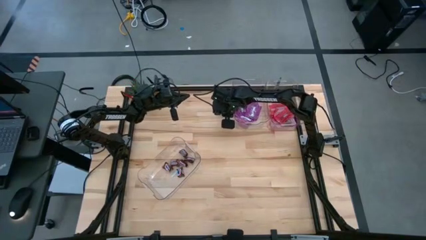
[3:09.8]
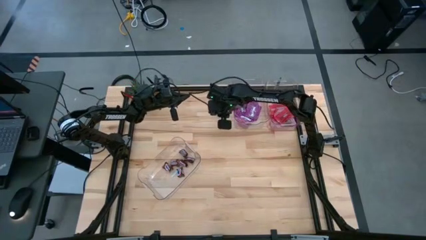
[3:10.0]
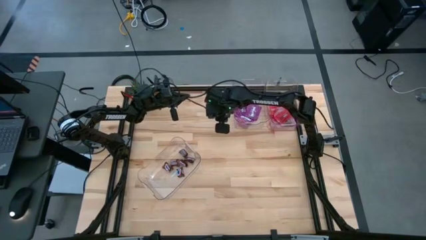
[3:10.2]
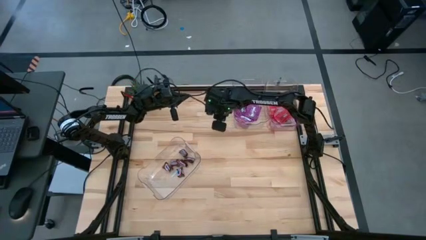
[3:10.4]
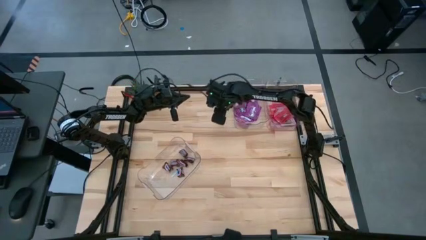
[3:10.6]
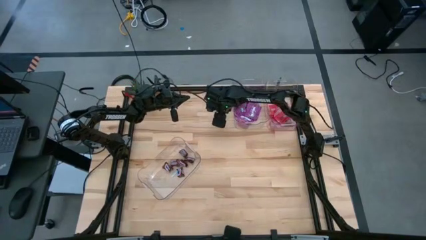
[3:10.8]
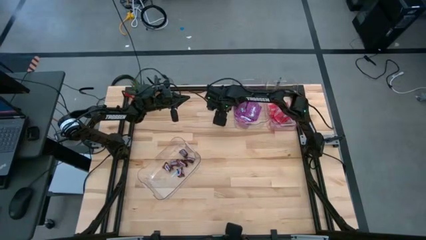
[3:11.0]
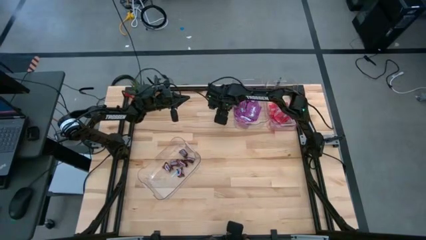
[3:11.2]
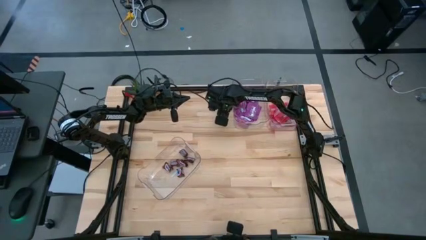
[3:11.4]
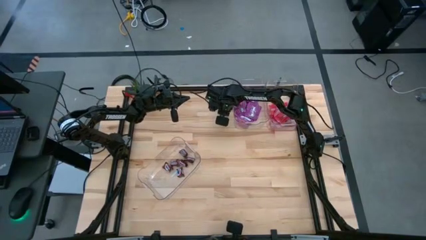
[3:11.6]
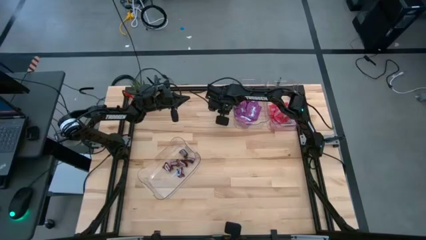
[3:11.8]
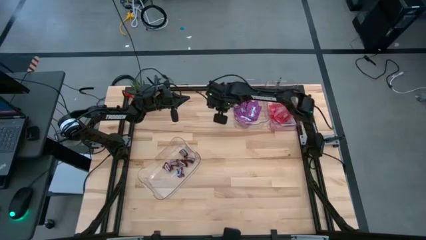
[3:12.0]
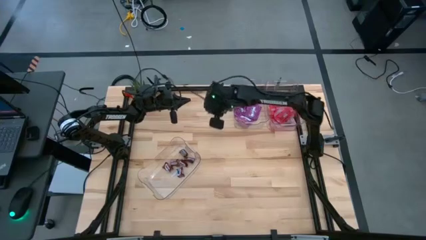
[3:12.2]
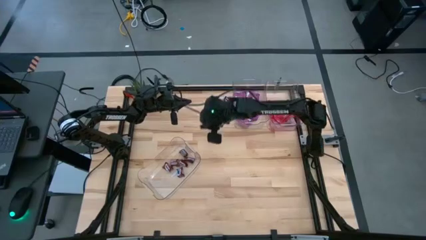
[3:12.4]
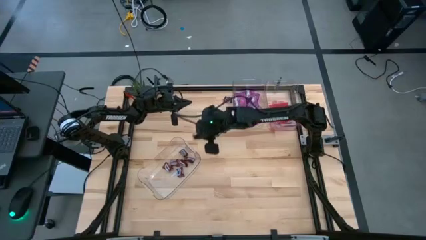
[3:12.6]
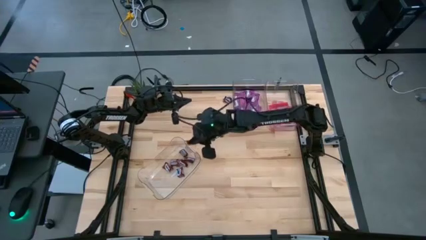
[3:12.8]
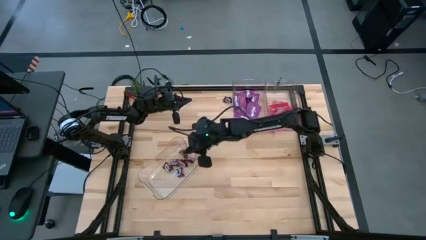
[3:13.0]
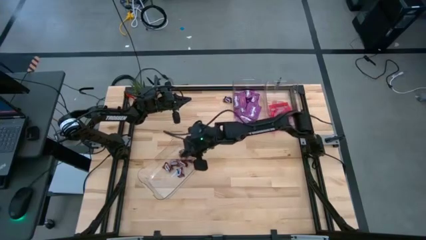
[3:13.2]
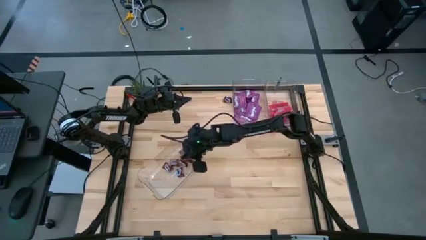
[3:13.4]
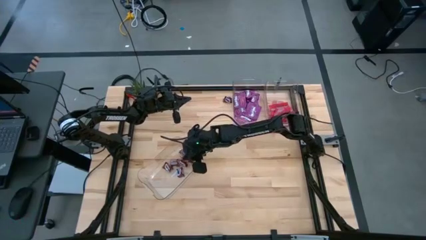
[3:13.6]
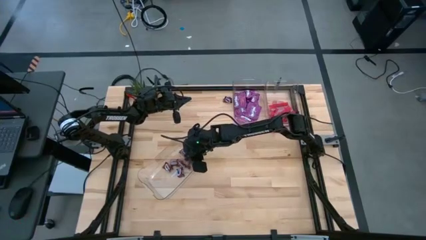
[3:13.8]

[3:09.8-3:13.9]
Task: Sort candy
Put the brown candy into the bottom transparent bin

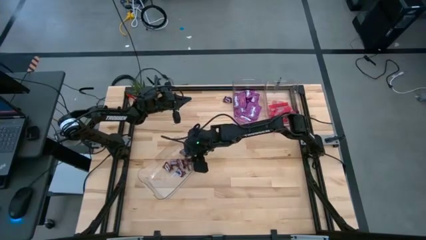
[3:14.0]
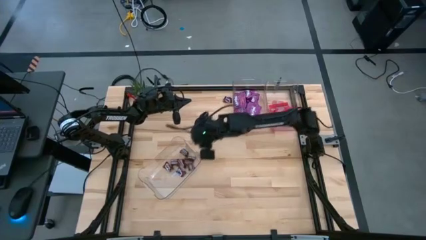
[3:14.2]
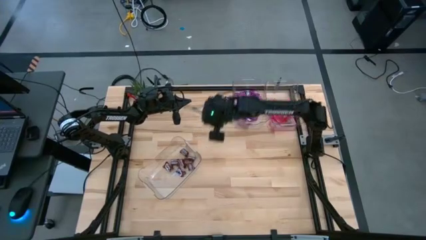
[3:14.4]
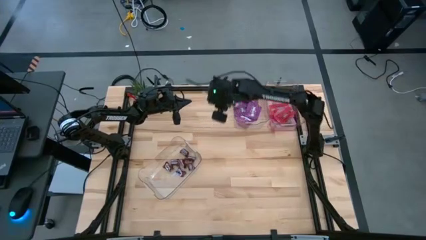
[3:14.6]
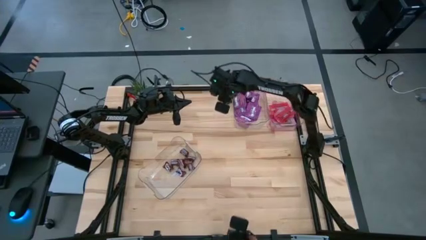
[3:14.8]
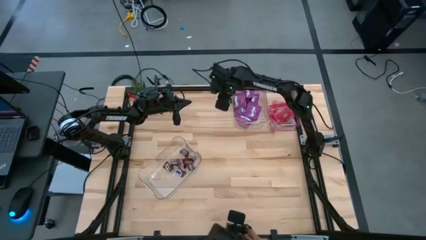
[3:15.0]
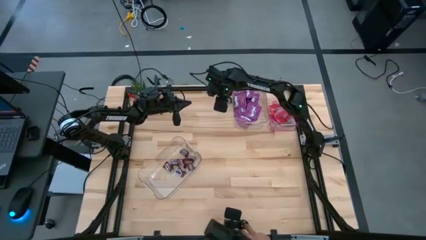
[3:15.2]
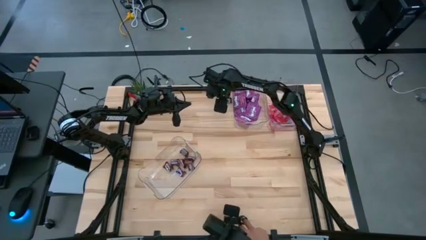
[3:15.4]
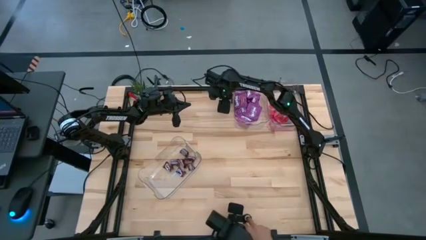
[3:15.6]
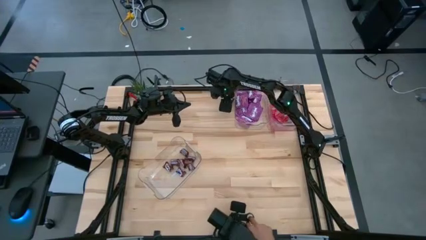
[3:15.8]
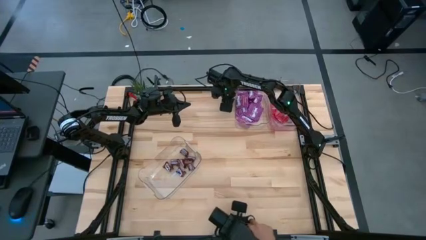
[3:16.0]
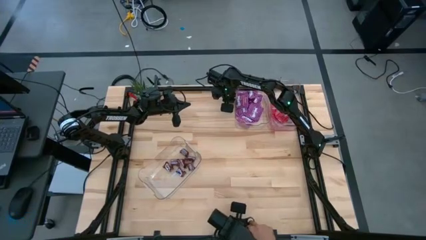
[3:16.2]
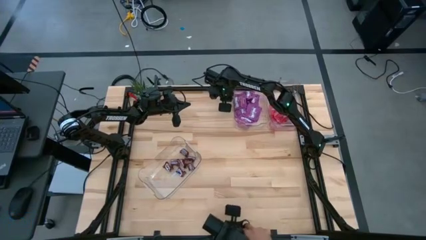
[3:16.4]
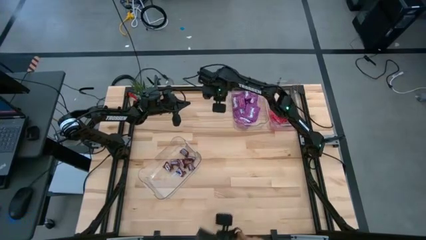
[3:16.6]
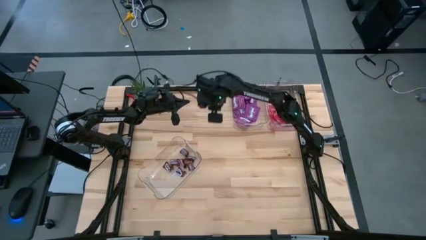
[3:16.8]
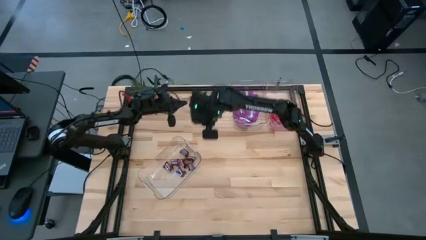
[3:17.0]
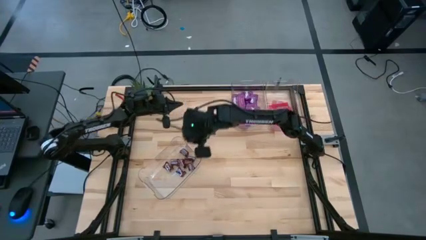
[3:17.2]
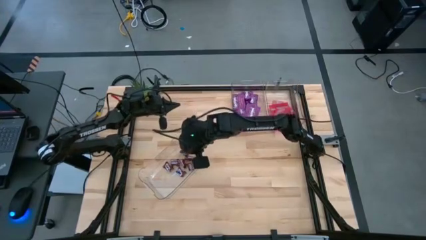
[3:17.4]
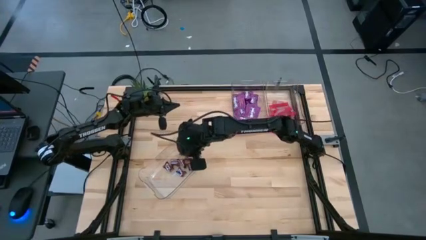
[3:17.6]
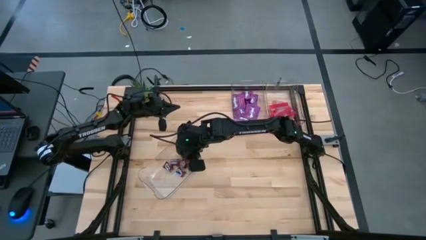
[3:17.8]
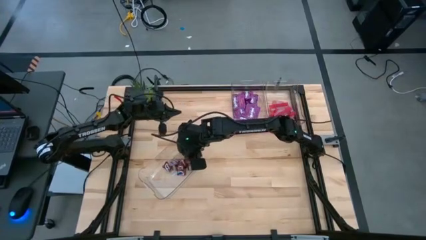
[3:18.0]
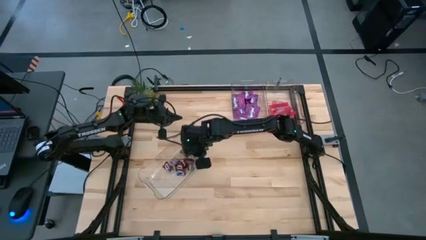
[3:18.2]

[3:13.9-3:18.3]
Put the brown candy into the bottom transparent bin

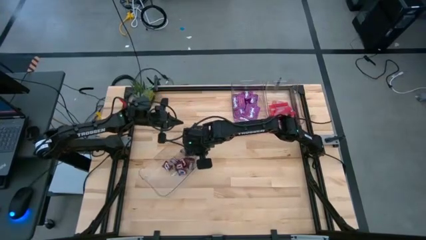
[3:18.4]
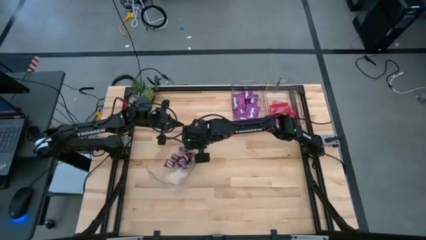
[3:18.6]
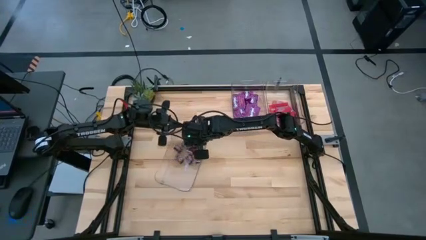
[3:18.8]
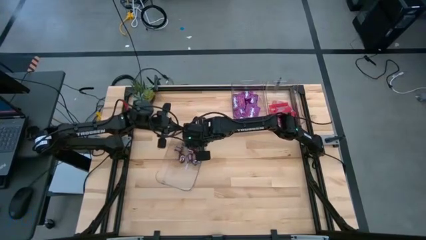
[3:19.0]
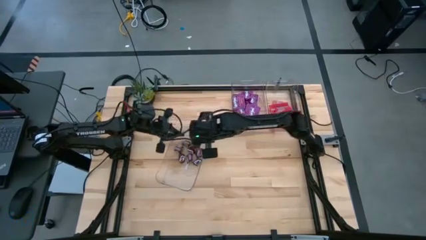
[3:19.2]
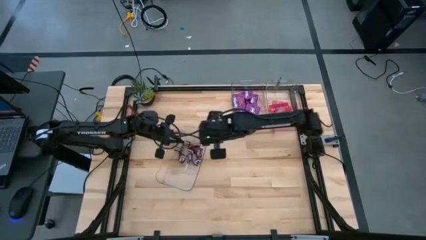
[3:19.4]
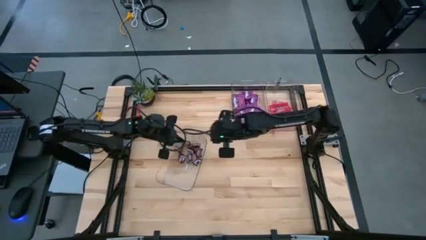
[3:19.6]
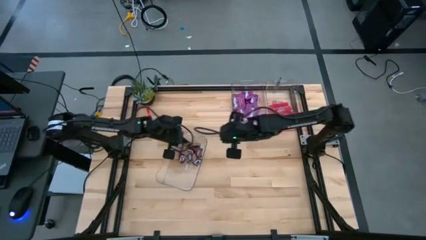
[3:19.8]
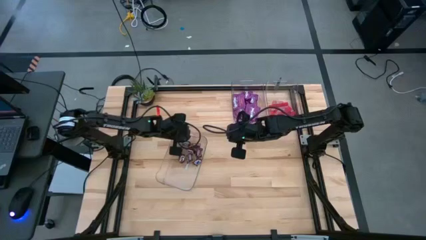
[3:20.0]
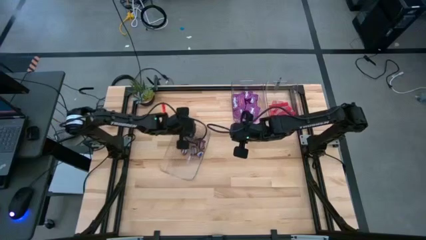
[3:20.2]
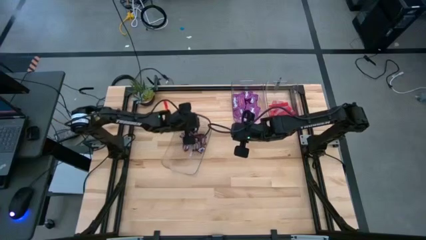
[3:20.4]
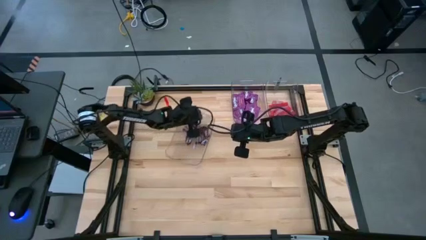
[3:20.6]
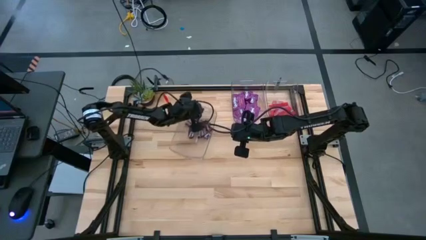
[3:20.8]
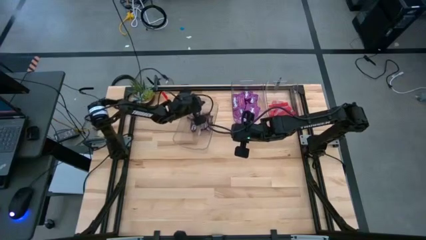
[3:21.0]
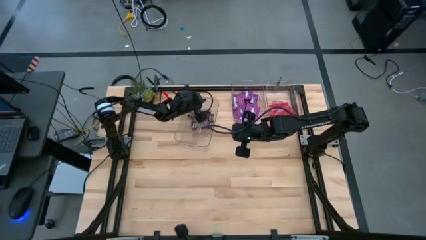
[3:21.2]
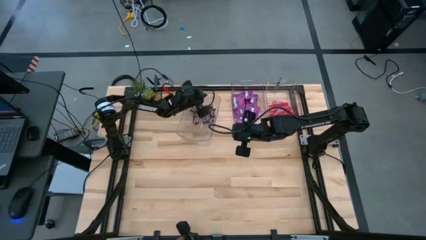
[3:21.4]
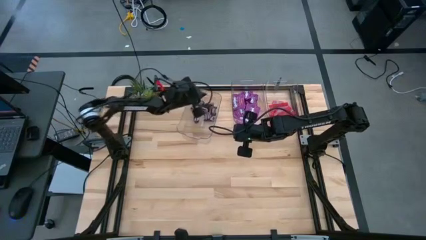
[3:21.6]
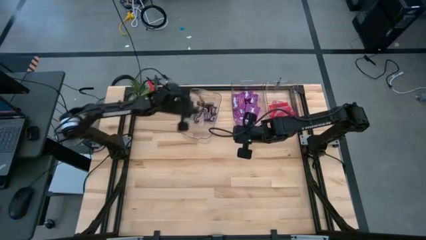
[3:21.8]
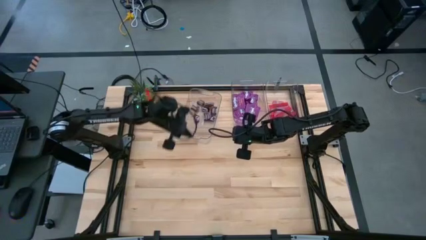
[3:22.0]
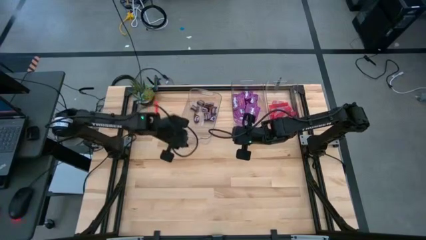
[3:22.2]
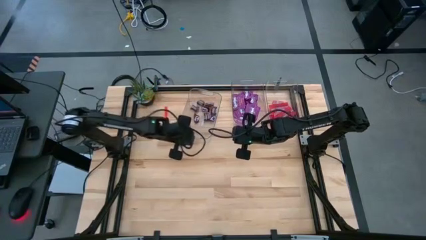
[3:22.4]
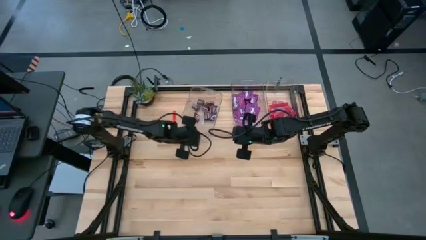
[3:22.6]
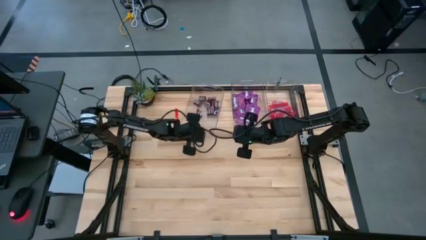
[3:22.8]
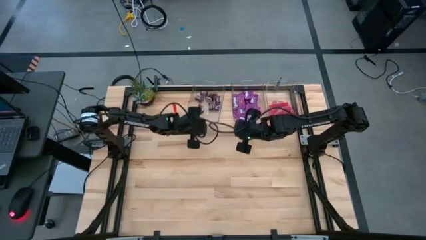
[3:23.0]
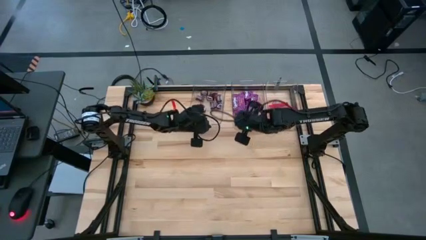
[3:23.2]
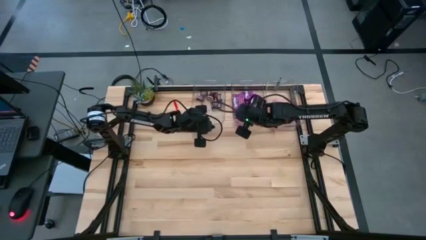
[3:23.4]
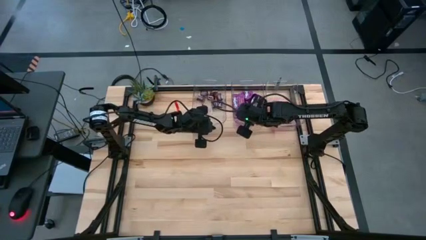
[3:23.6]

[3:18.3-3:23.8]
Move the bottom transparent bin beside the top left transparent bin

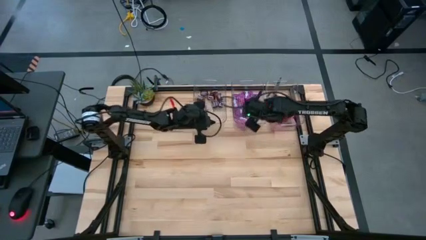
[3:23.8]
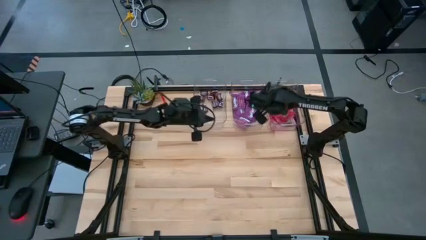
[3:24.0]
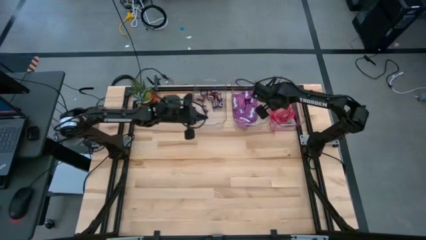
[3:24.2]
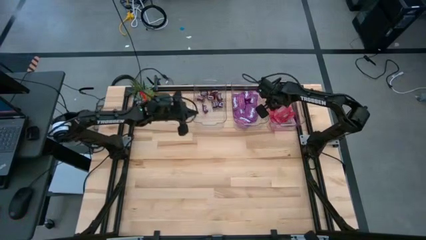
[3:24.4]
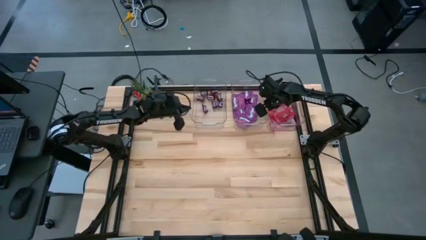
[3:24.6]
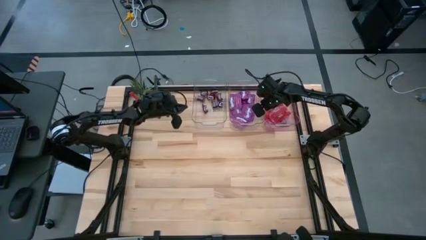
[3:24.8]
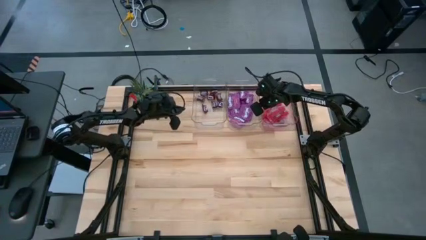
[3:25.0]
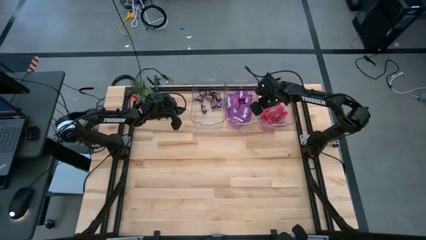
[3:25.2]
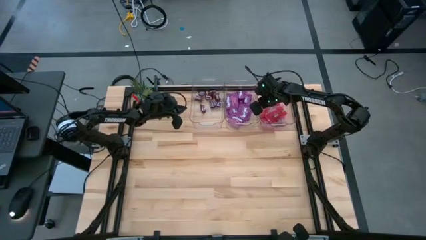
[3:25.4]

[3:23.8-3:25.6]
Adjust the transparent bins

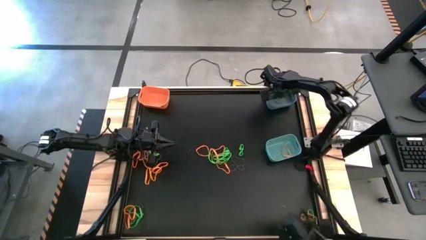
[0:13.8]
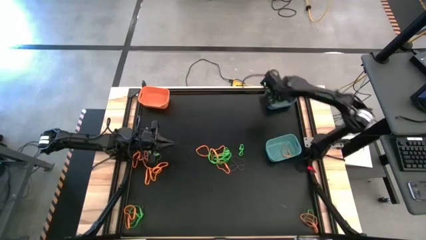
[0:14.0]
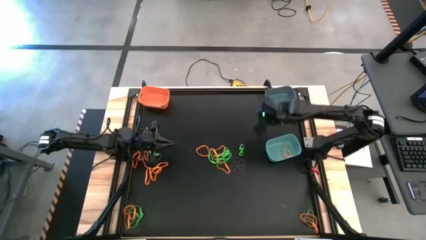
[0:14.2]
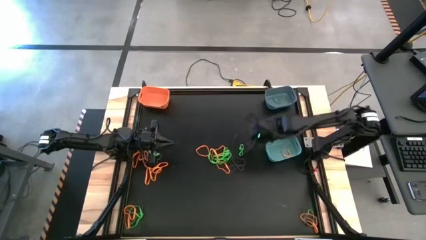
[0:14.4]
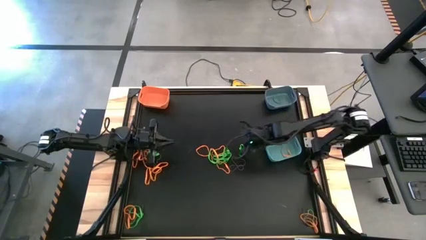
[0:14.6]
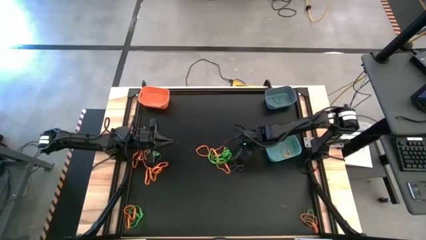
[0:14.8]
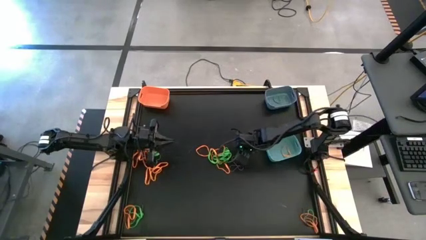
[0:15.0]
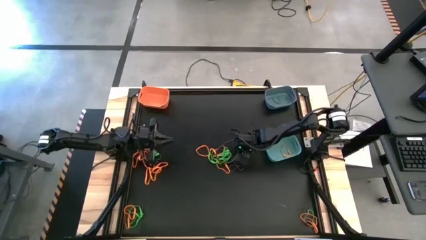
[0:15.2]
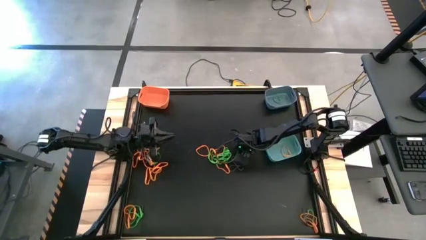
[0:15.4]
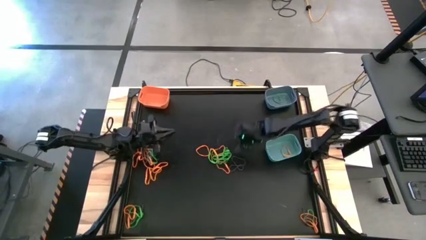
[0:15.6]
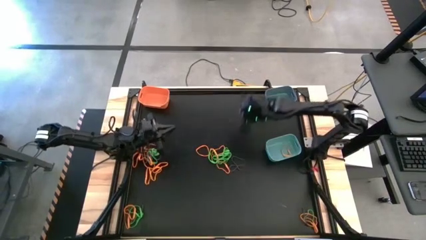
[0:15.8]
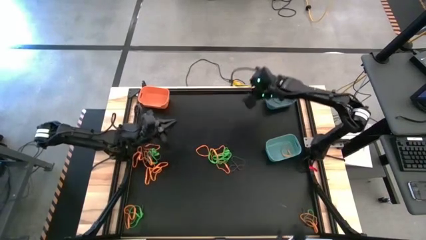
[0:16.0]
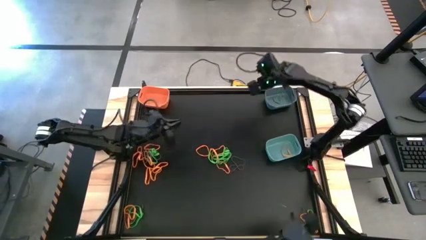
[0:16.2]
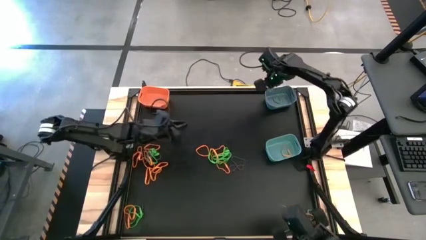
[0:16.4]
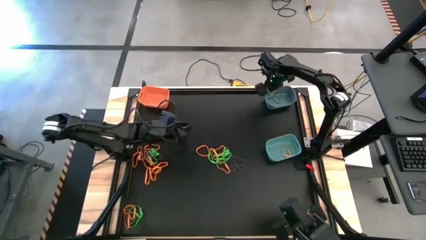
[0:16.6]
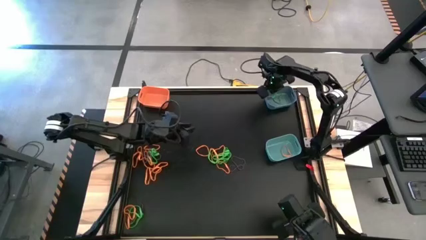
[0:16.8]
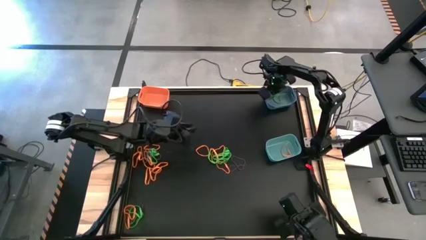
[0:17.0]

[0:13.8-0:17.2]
Task: Sort rubber bands into baskets
Put the green rubber band into the blue bin
